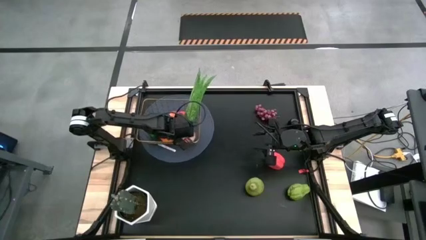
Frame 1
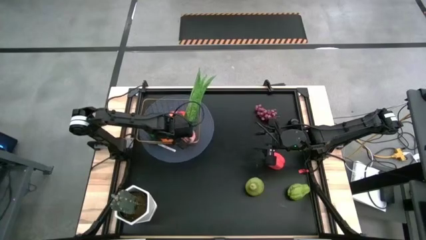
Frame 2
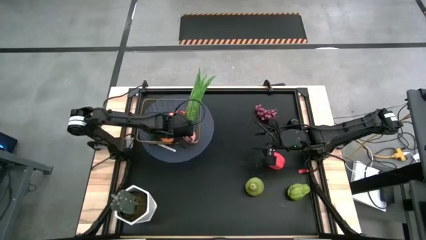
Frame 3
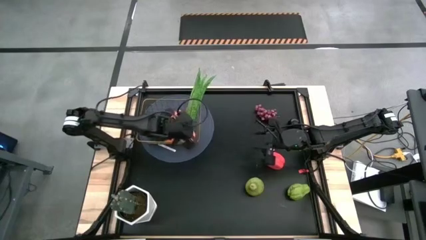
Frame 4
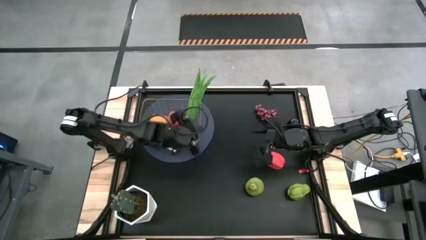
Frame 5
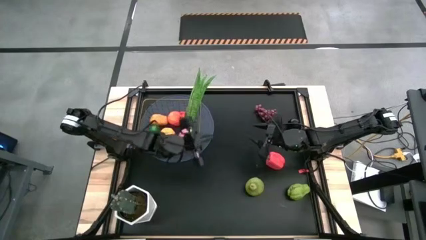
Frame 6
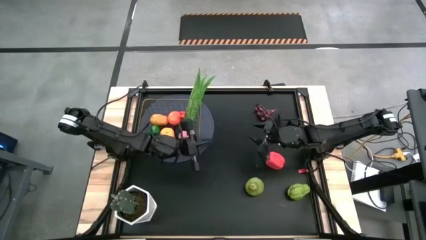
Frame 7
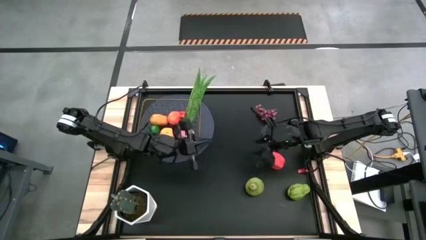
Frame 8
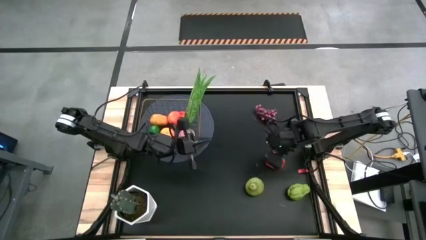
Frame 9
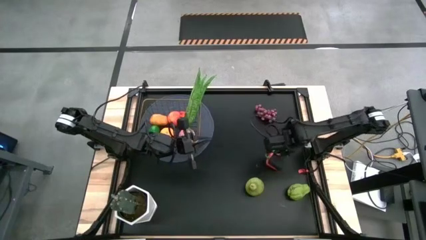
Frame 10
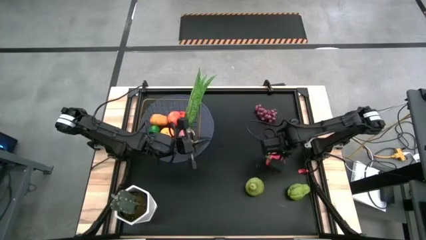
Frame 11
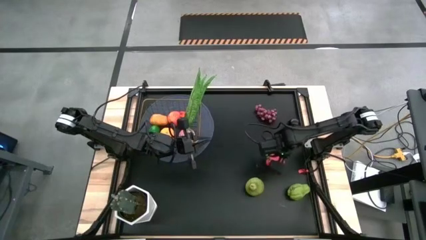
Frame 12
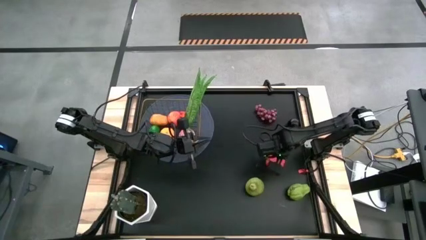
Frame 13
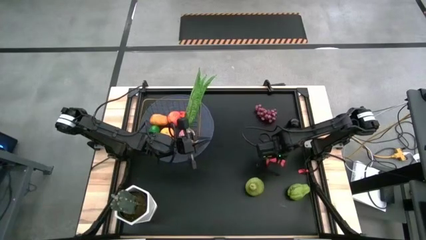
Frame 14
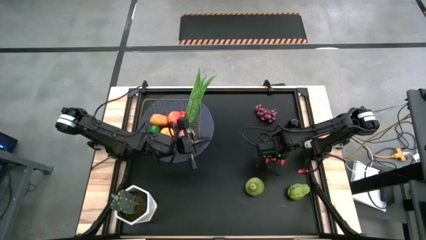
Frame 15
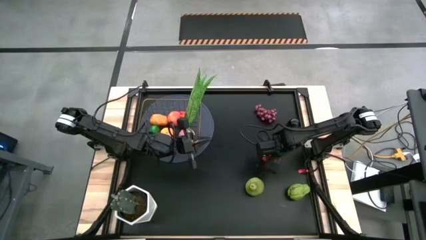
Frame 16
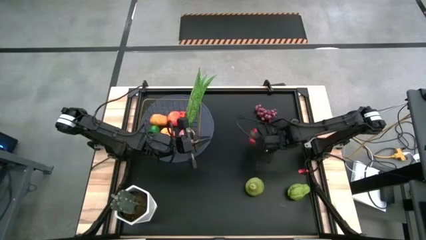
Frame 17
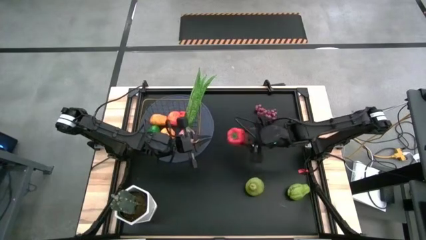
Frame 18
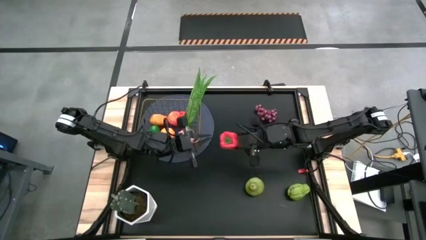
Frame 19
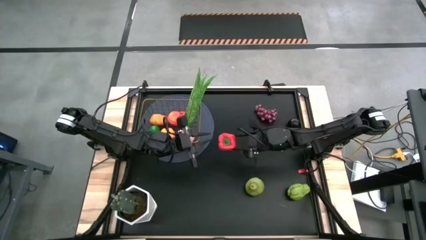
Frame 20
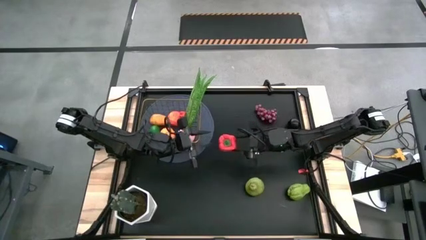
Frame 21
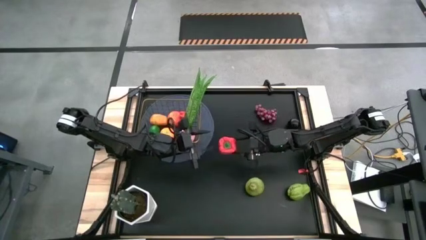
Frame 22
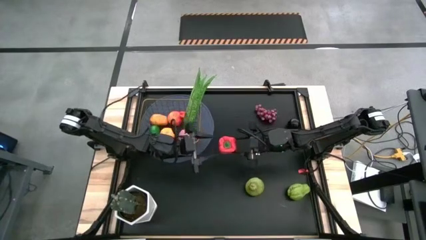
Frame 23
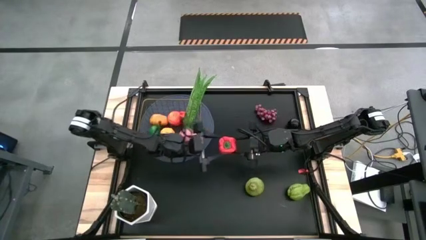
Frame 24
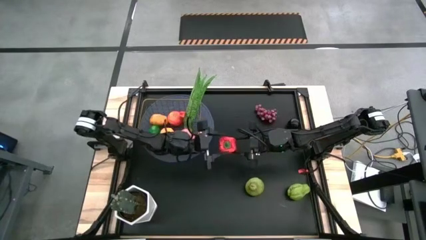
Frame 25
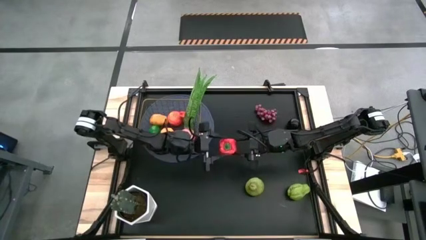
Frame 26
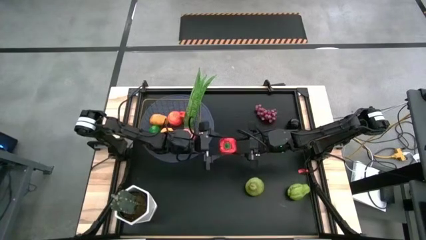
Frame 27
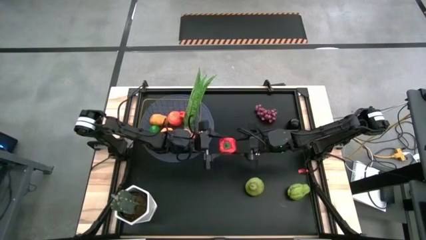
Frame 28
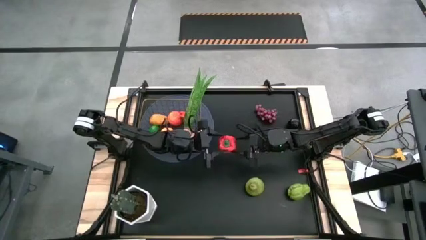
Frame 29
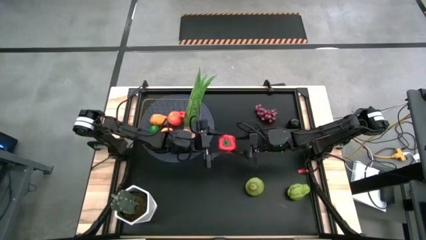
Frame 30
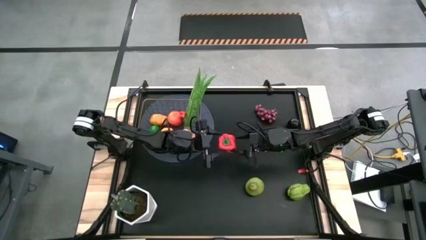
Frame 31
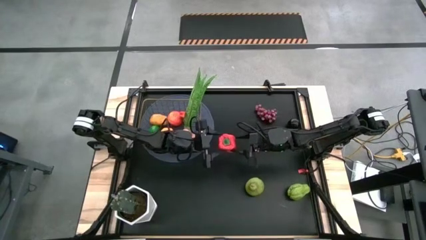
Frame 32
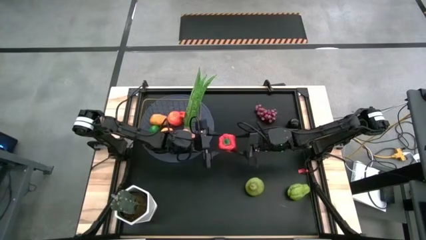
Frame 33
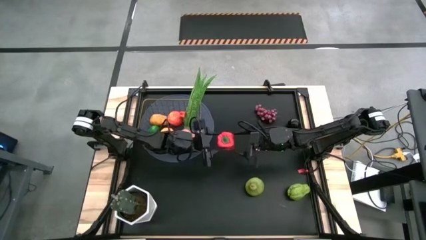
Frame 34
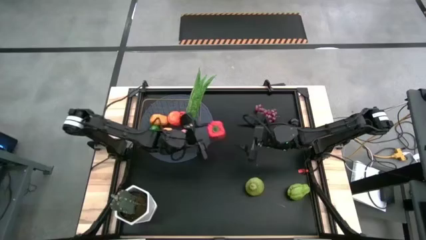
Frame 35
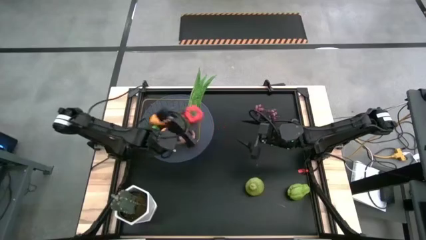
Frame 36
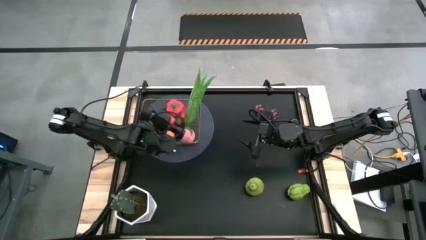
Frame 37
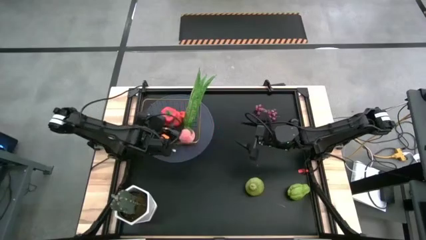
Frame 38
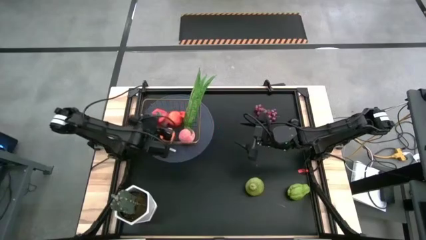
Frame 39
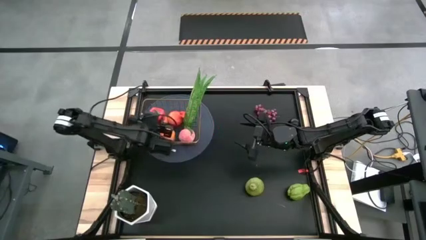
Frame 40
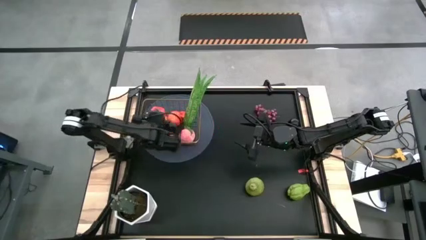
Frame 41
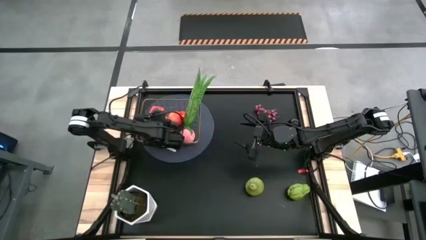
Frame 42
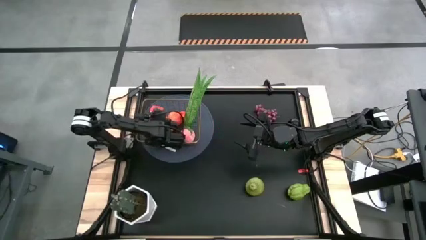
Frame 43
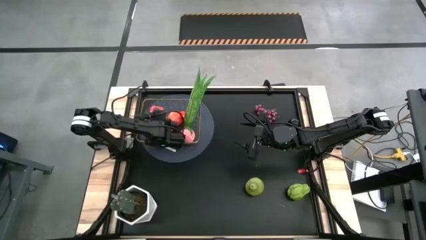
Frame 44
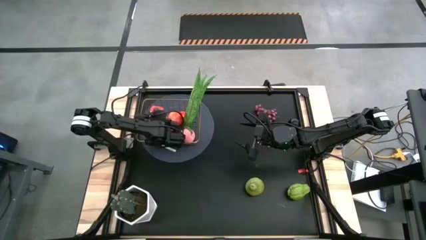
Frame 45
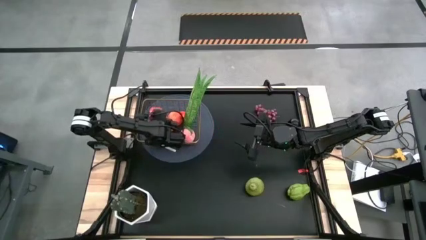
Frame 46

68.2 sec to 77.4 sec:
Task: Build produce basket
Put the red bell pepper into the wire basket

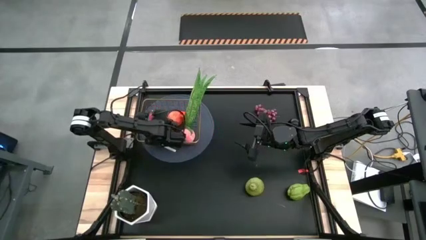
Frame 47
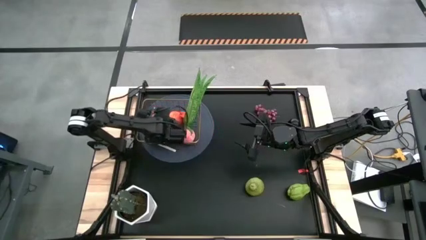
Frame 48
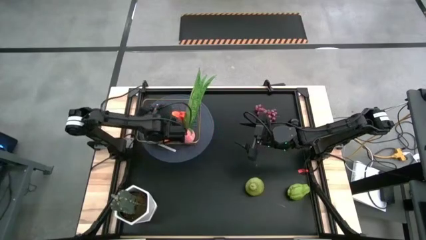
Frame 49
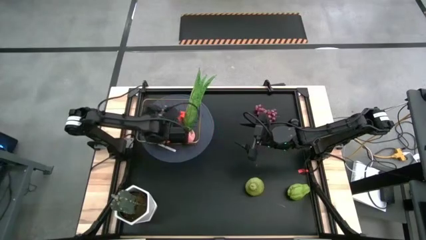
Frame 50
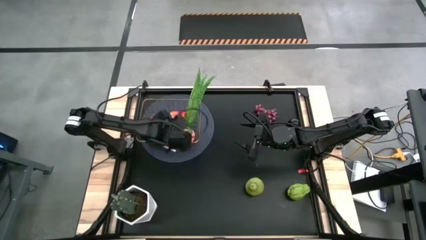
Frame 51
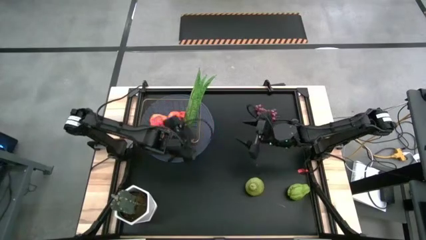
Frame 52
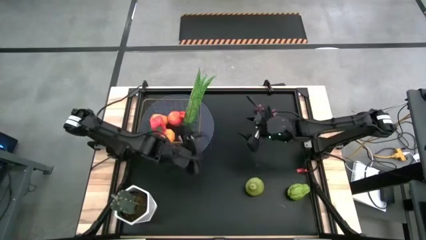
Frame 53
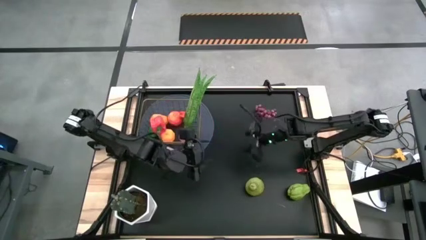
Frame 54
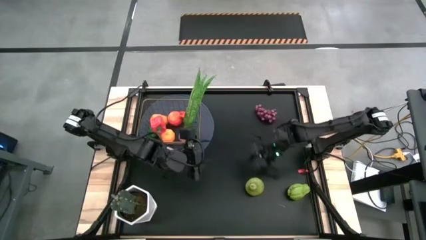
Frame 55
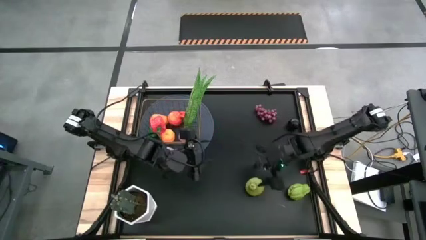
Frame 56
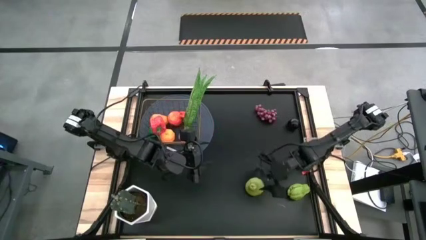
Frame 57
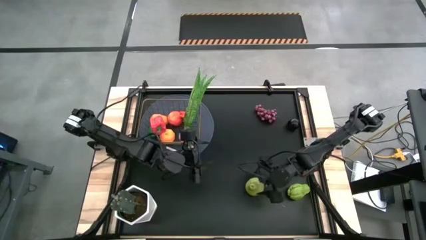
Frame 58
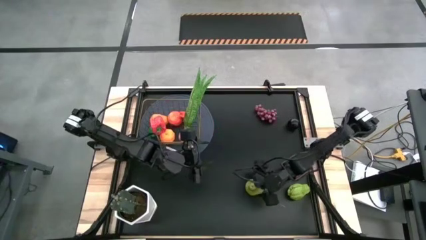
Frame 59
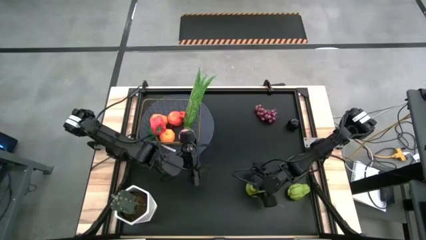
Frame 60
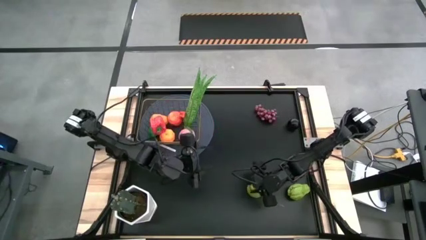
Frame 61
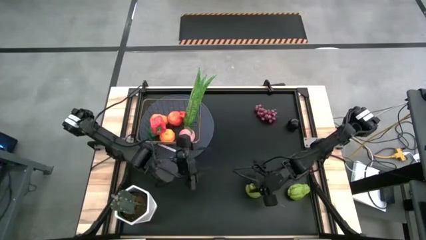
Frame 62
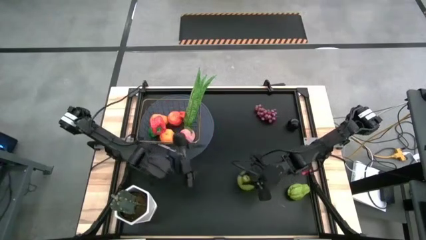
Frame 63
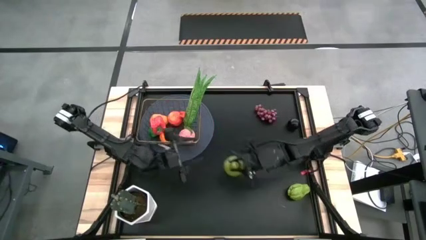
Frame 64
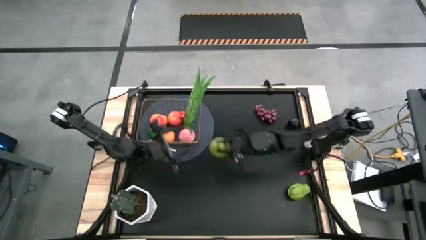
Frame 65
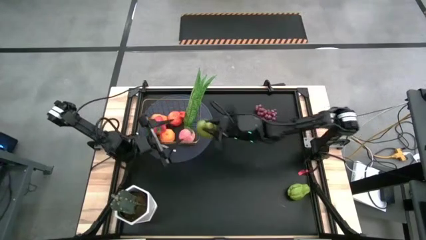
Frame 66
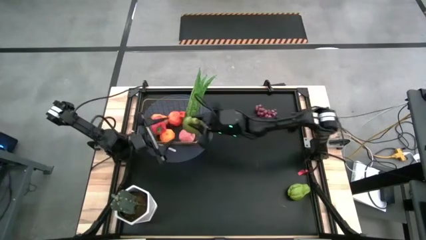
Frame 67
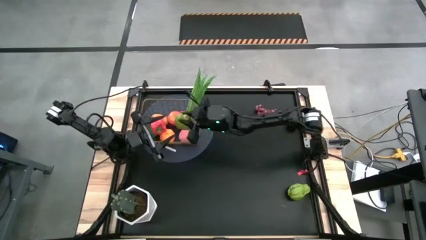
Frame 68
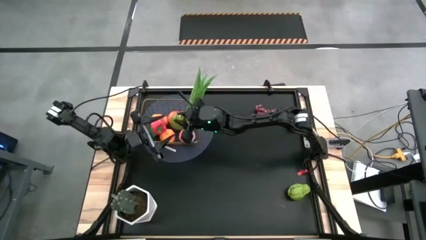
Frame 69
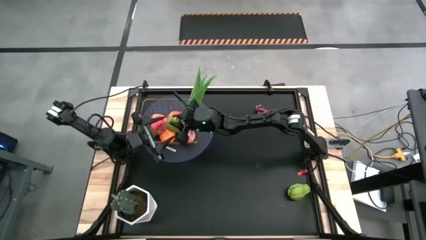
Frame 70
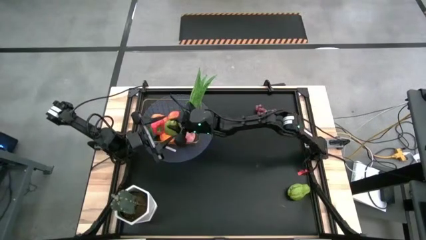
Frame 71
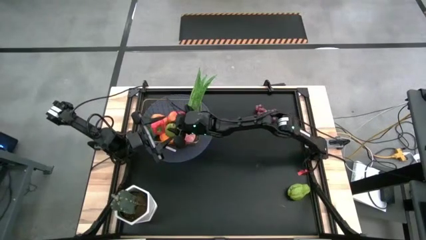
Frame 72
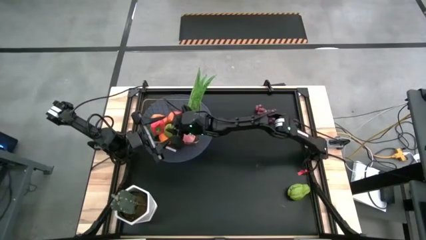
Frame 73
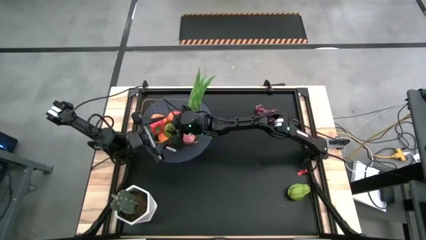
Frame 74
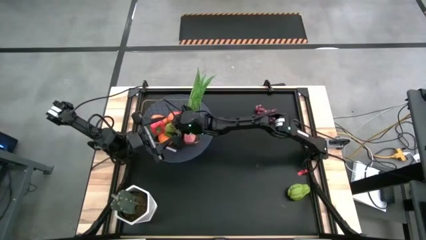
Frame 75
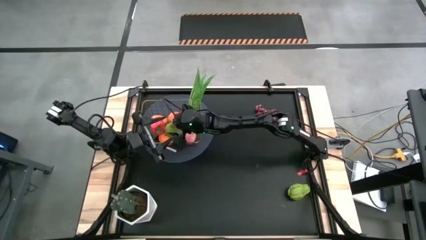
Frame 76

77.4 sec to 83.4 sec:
Put the green pear into the wire basket

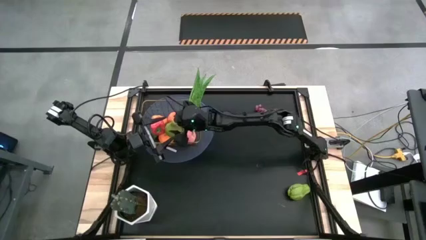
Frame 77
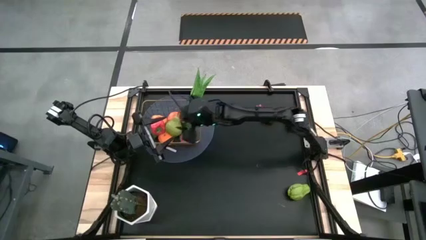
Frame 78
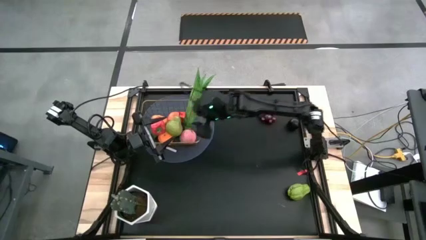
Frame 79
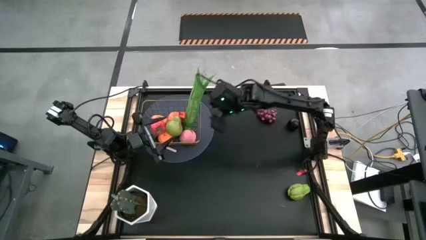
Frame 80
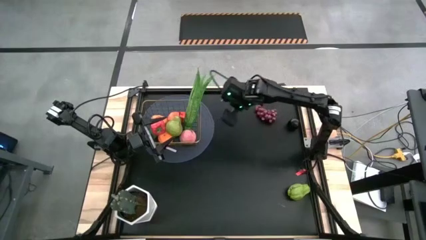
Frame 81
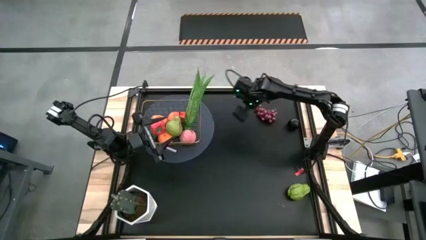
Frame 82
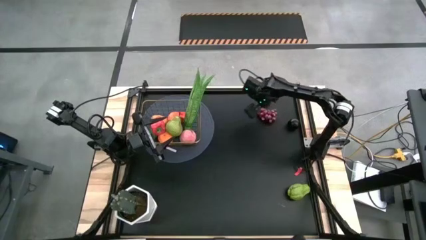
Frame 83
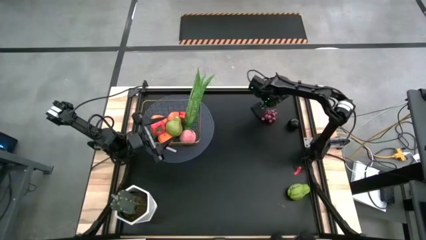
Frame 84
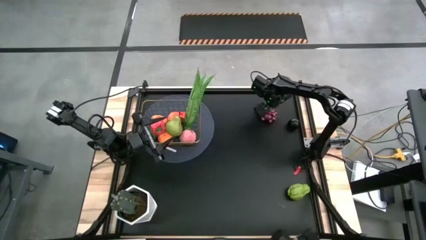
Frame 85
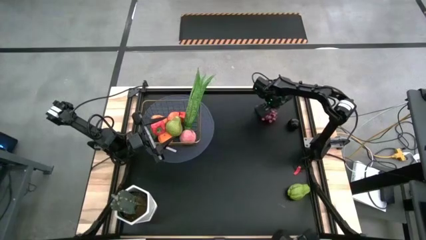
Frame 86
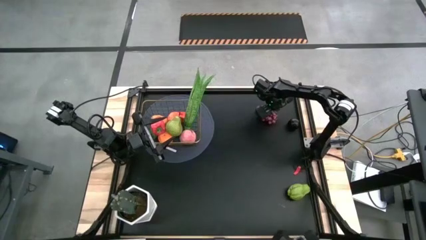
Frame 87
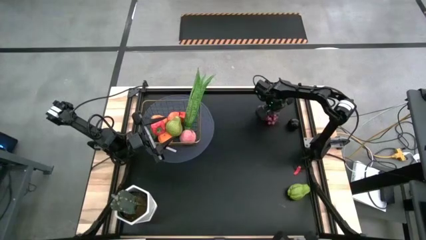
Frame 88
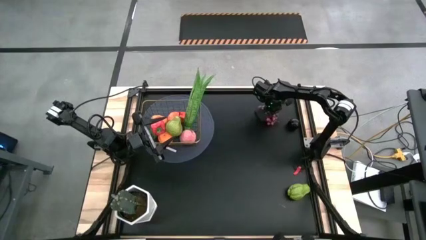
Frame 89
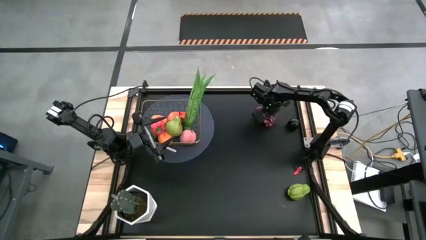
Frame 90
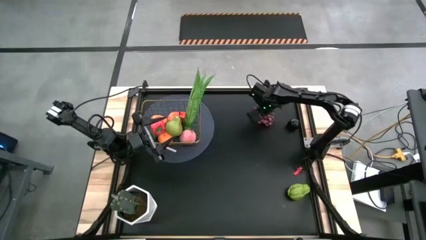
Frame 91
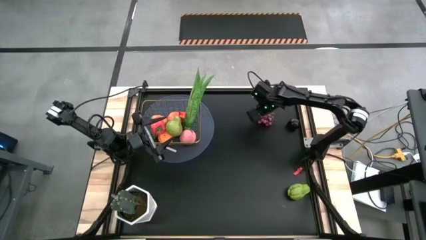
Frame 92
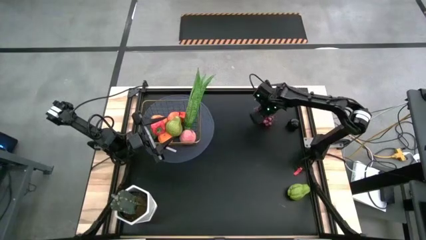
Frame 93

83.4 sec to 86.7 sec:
Put the red grapes into the wire basket
